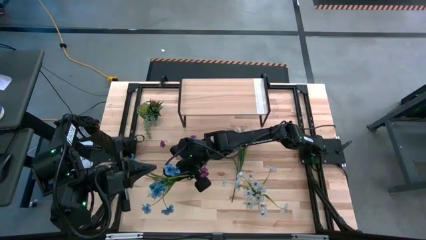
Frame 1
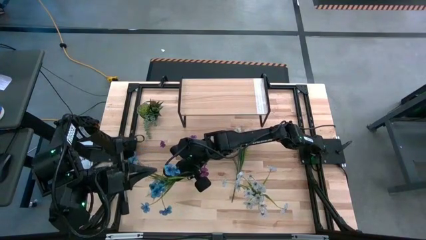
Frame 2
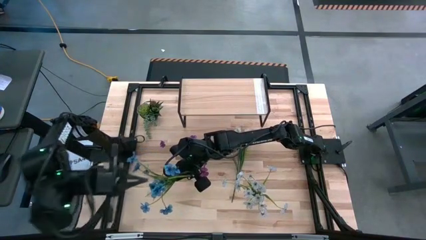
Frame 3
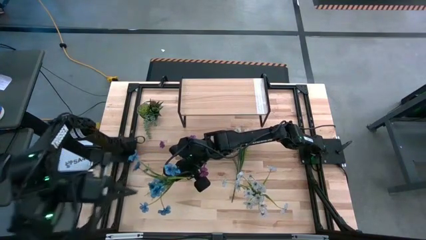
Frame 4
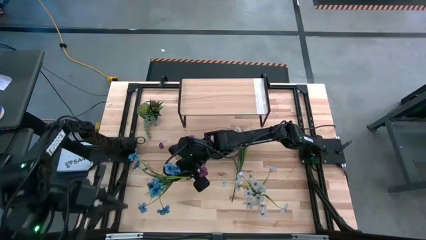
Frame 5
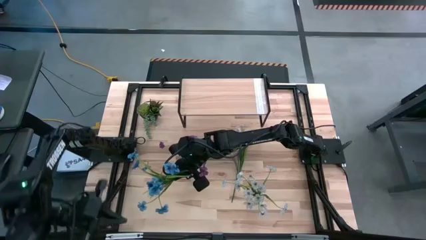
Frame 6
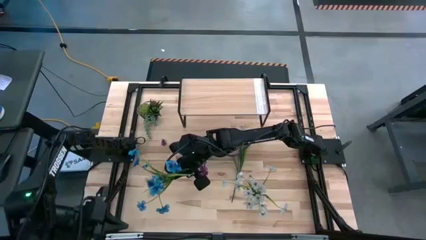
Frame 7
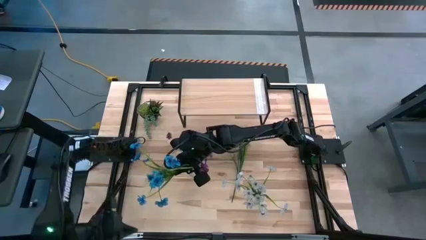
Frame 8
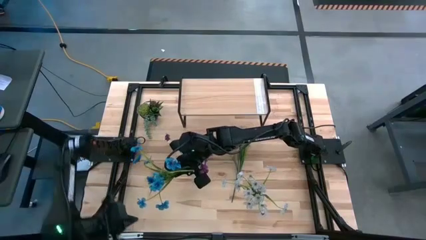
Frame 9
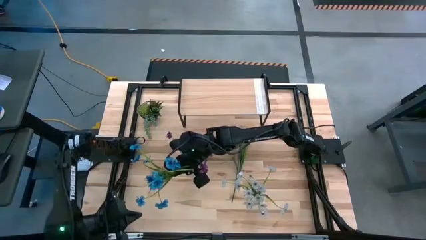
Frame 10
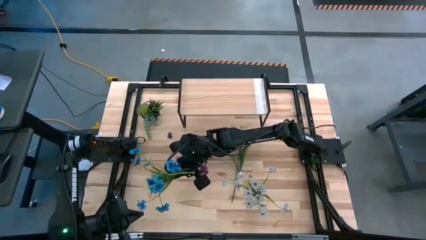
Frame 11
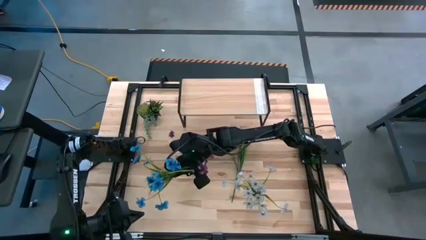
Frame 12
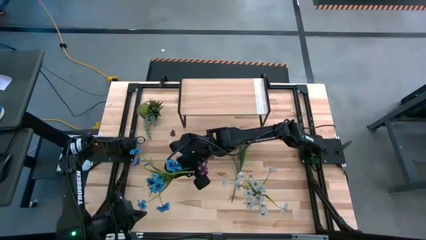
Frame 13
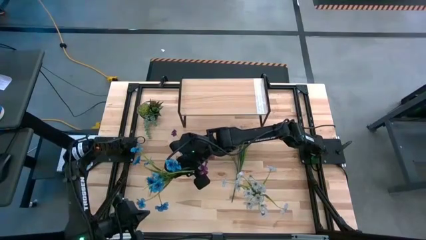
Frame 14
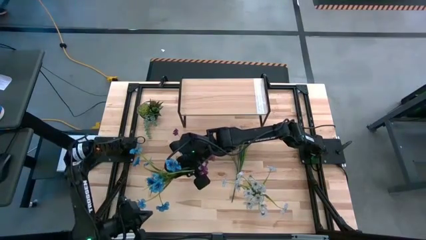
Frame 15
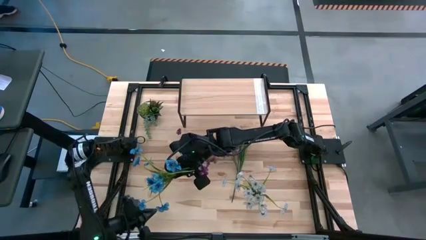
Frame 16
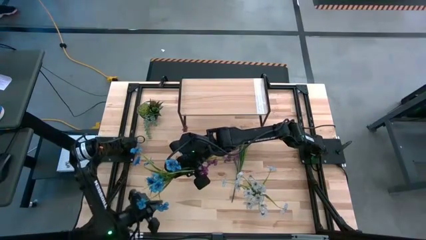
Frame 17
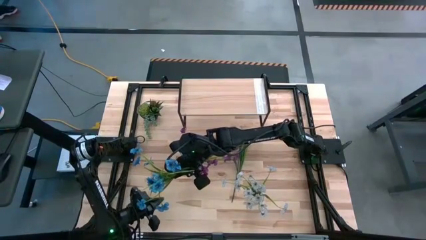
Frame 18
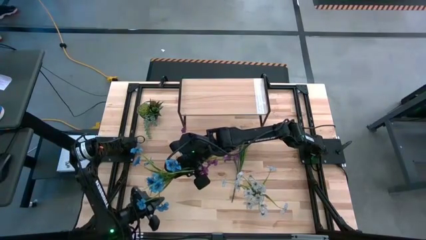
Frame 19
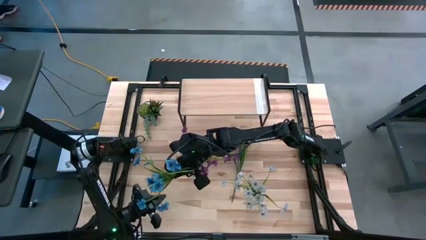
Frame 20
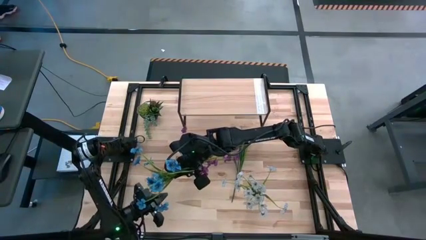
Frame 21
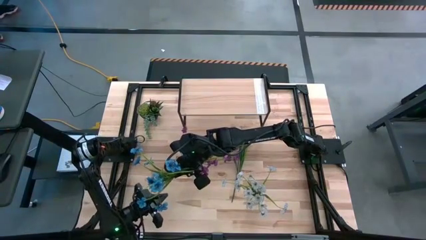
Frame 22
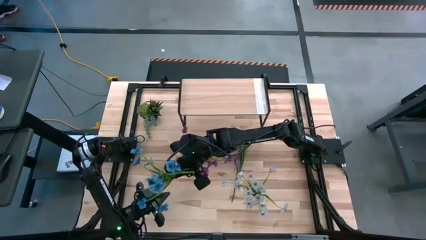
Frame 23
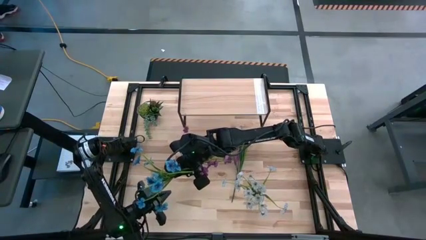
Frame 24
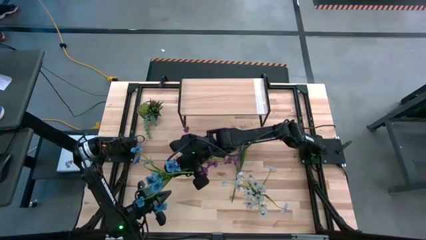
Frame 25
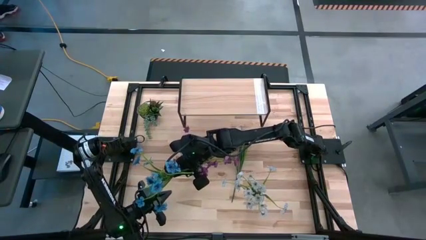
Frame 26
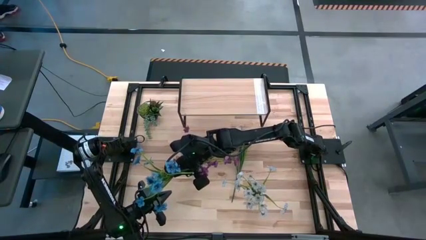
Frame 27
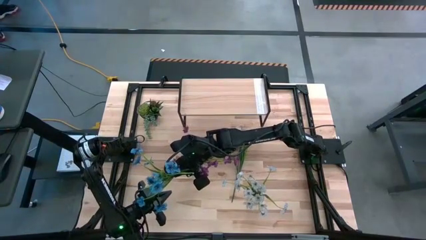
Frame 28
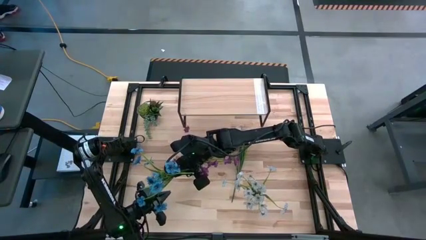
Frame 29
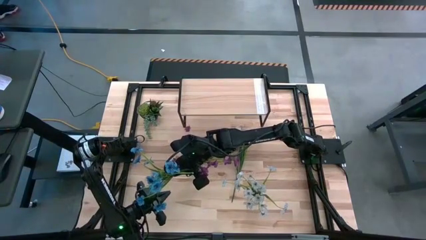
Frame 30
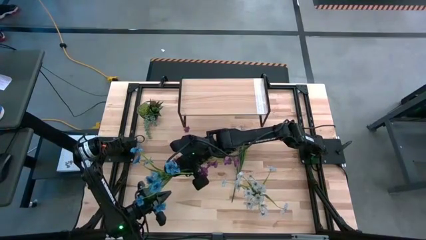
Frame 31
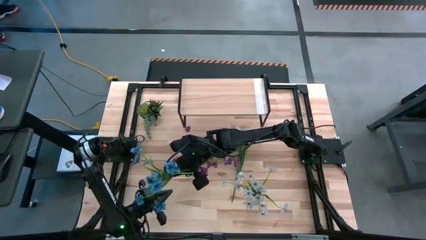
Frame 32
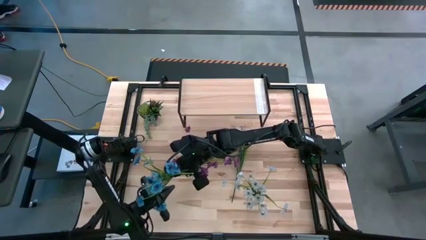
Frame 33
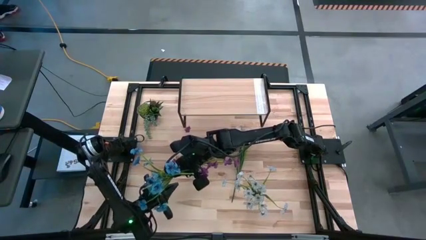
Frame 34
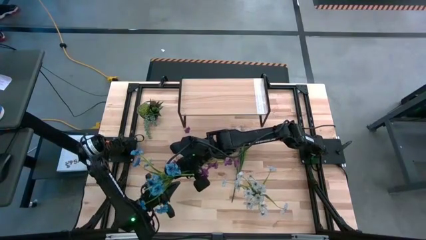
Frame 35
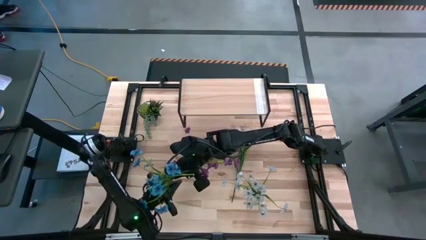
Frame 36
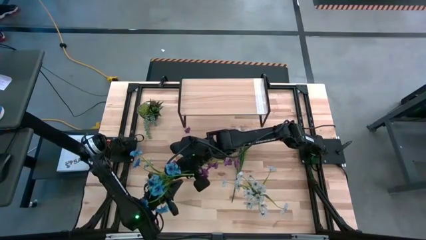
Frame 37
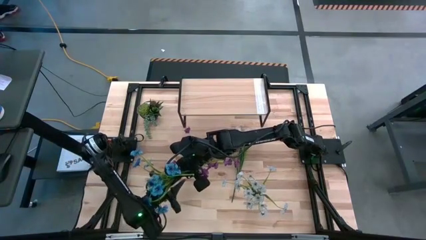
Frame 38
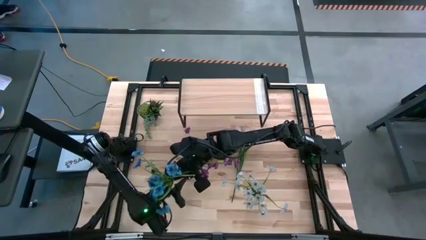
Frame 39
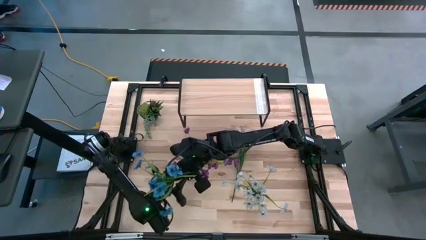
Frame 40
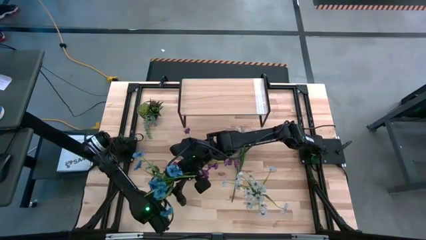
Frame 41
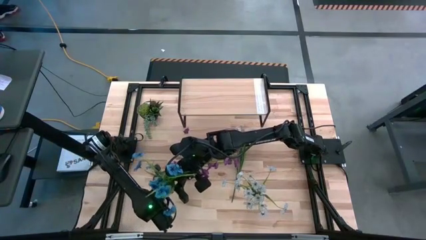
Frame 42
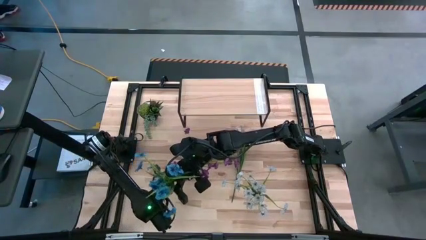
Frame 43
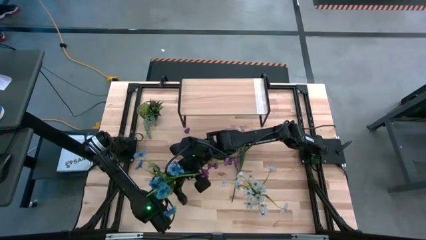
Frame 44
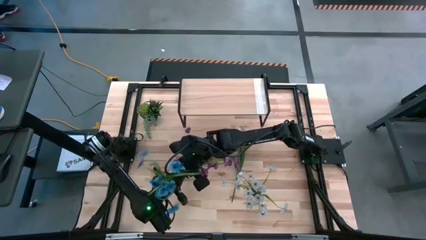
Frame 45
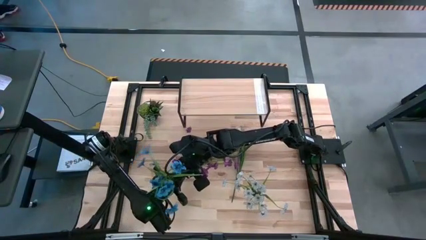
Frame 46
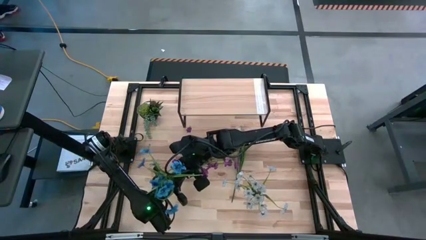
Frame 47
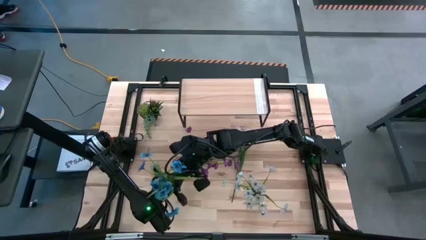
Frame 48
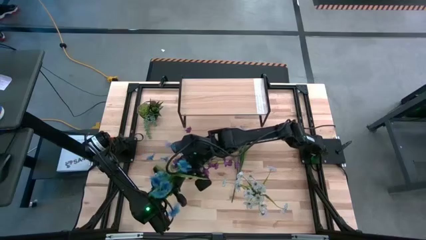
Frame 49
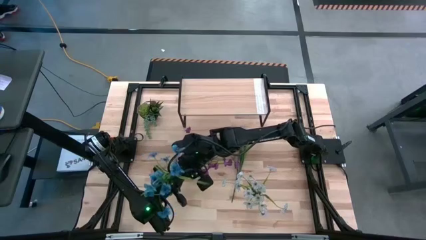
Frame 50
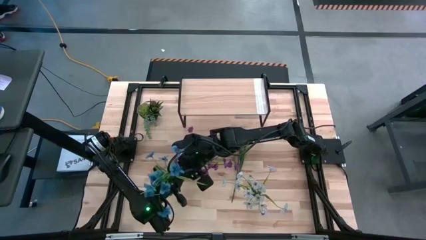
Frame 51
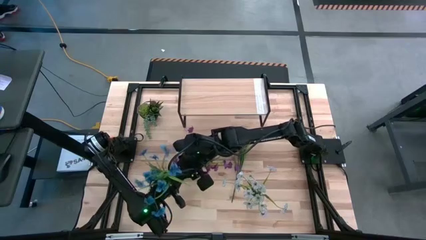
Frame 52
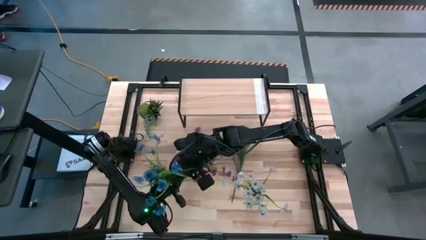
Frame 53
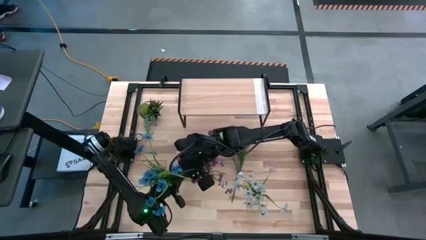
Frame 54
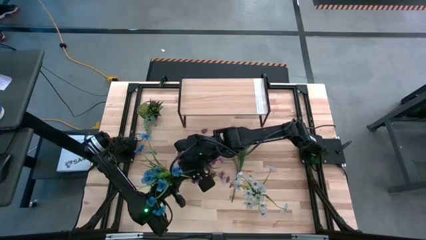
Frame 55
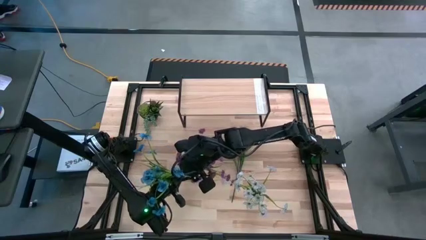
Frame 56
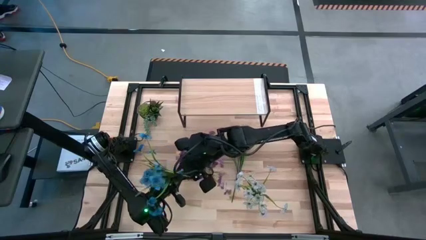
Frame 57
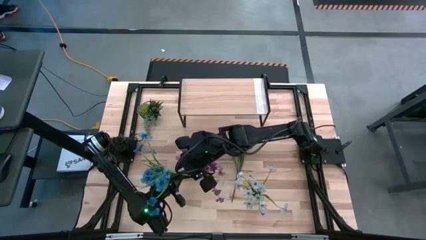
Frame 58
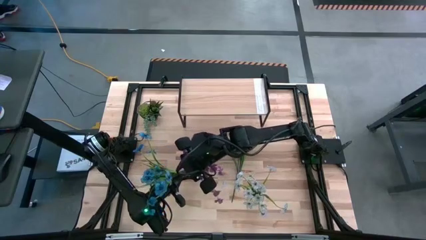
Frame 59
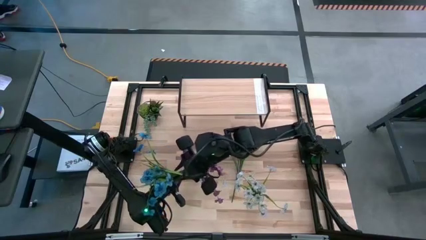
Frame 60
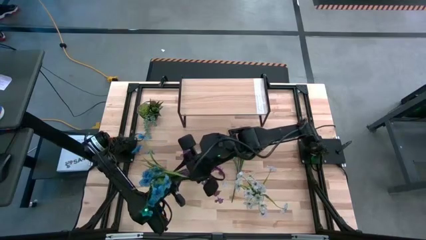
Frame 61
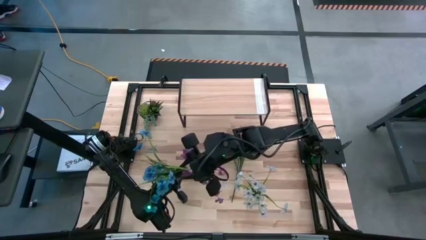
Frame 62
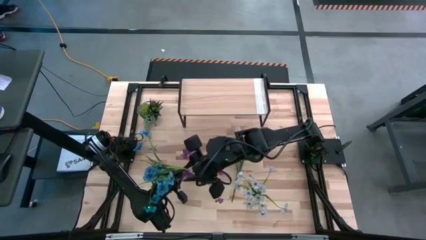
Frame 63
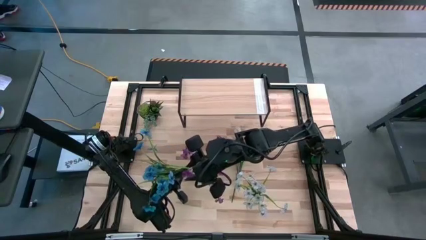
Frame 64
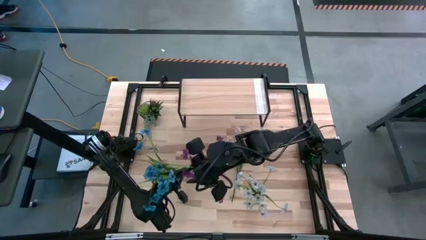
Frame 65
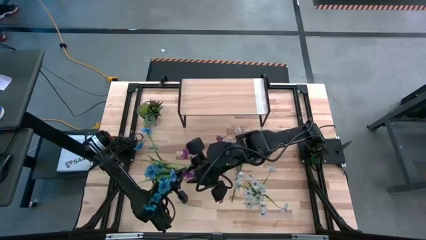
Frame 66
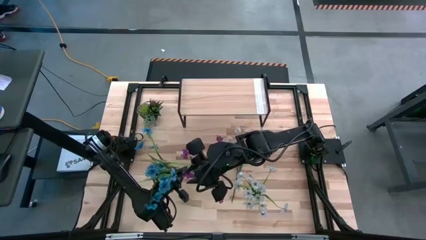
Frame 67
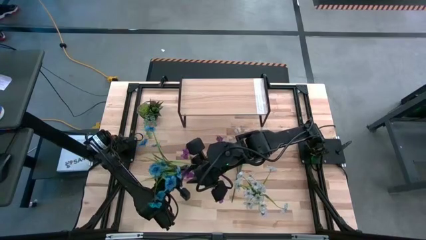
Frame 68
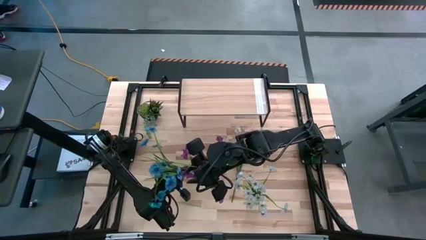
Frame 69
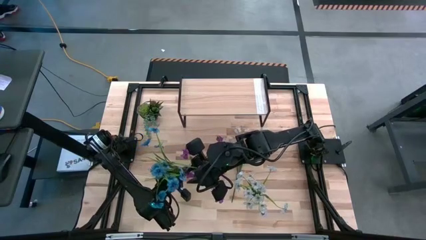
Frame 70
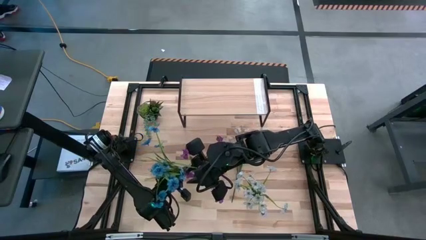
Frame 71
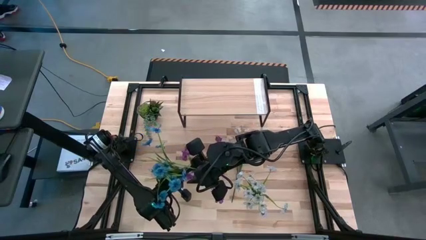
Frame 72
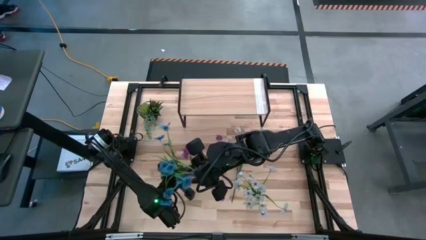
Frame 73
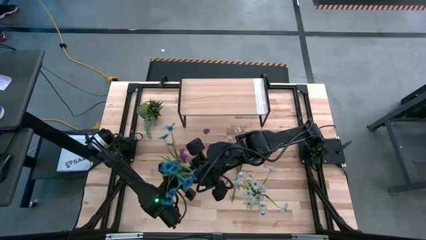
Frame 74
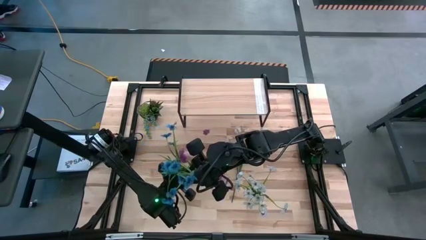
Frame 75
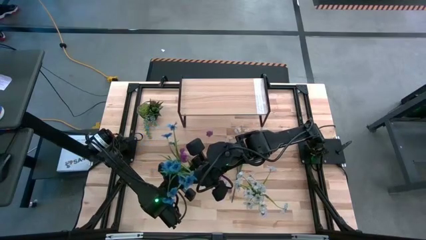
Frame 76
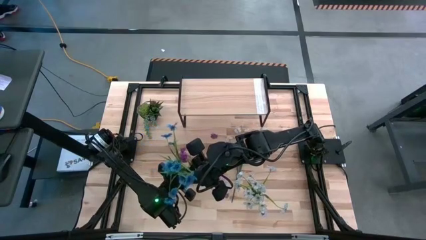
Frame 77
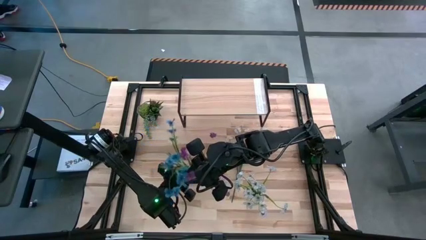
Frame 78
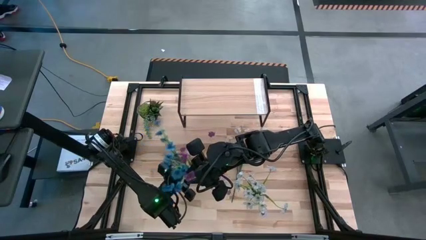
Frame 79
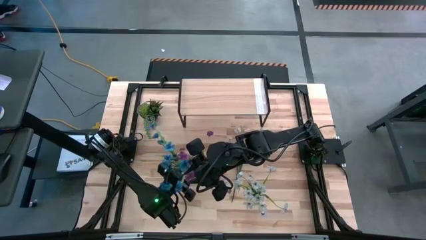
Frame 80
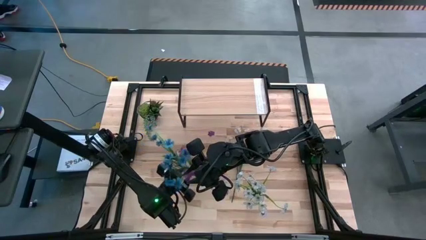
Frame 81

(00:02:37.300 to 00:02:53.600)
Task: Pick and place flowers into a vace then onto a shelf
Put the blue flowers into the left transparent vase
